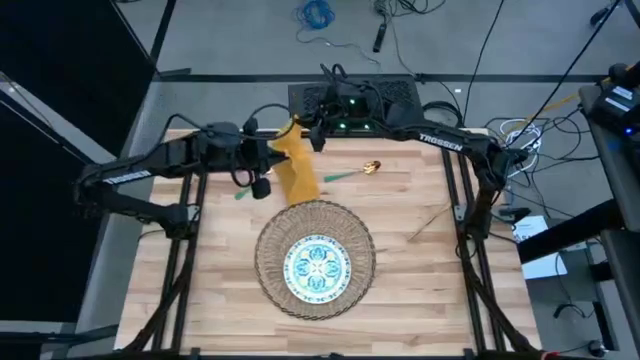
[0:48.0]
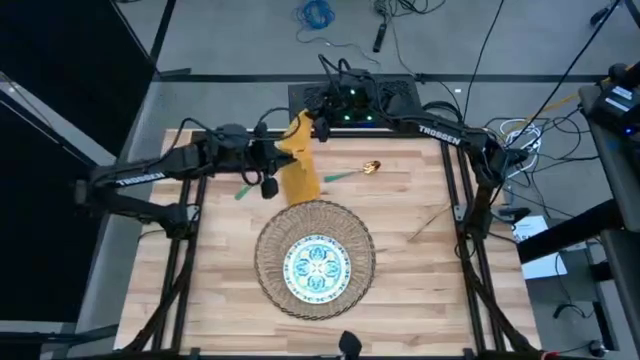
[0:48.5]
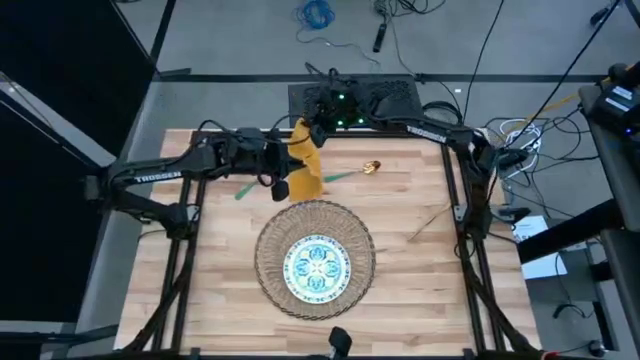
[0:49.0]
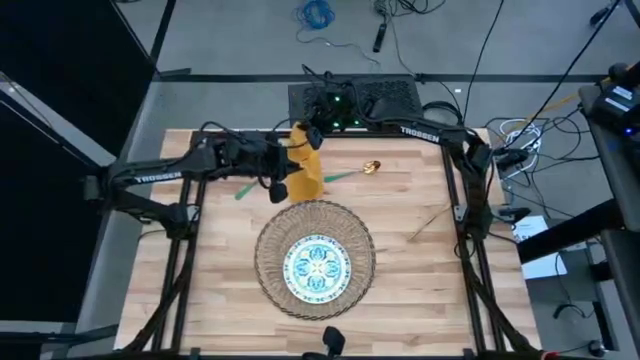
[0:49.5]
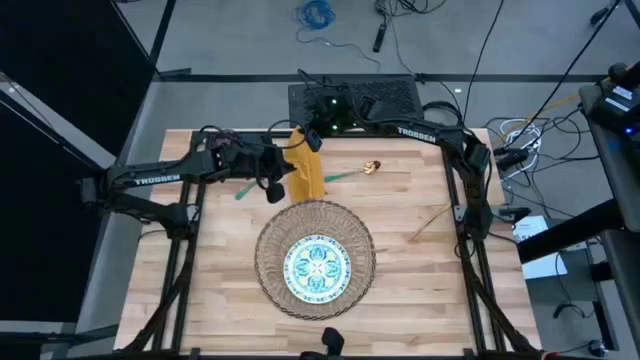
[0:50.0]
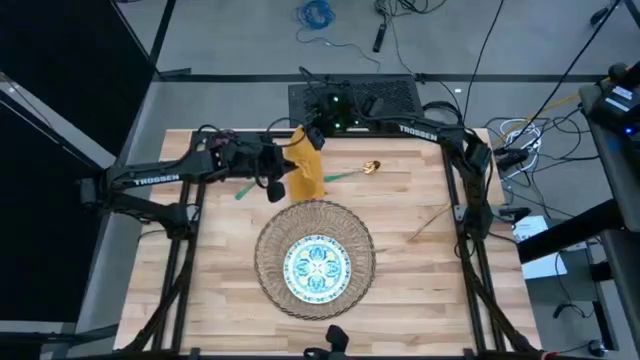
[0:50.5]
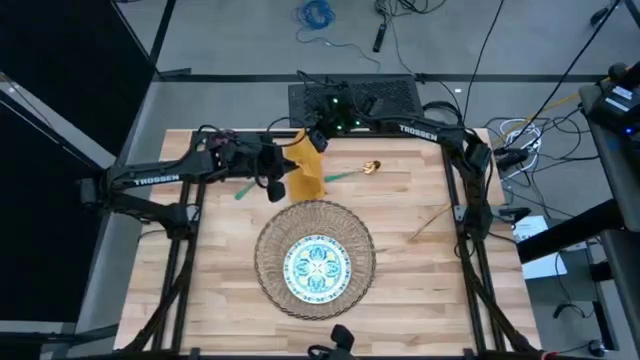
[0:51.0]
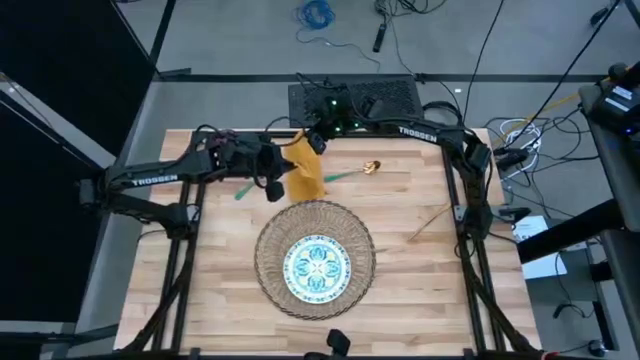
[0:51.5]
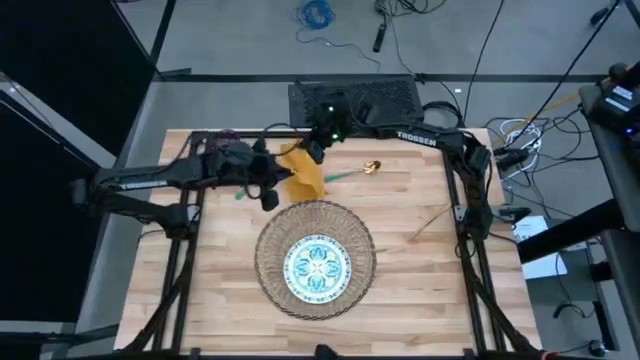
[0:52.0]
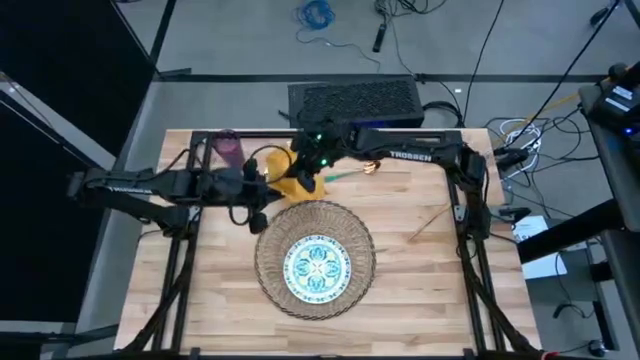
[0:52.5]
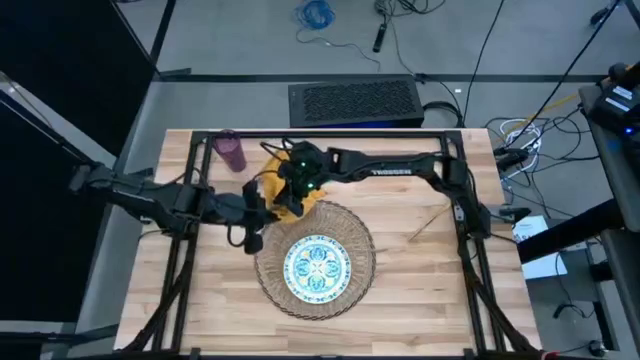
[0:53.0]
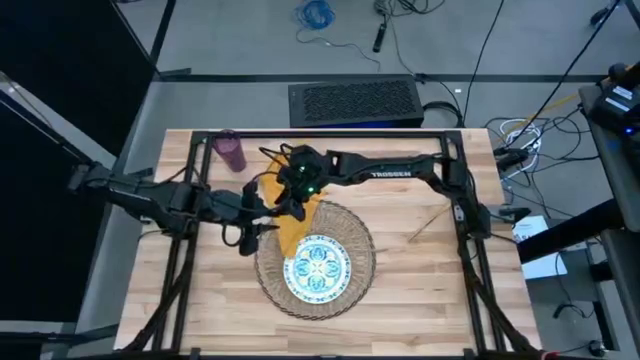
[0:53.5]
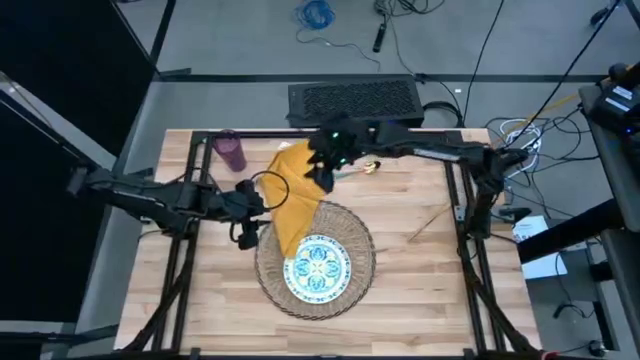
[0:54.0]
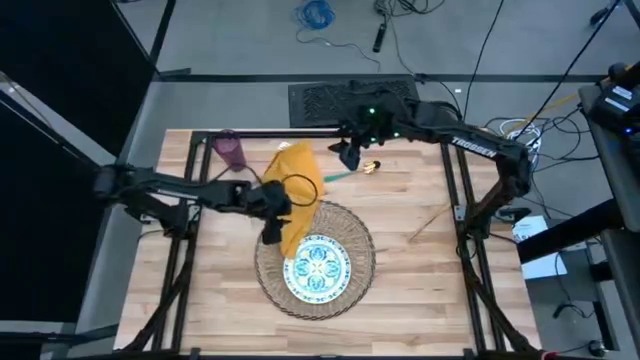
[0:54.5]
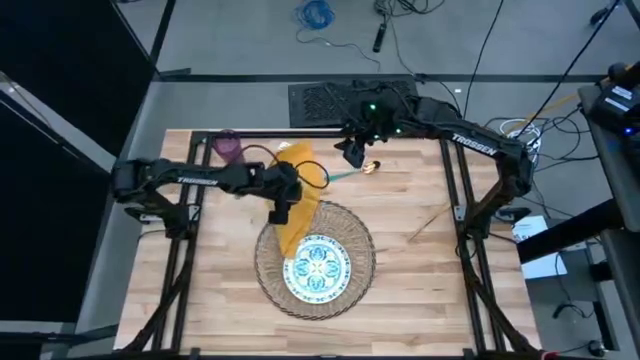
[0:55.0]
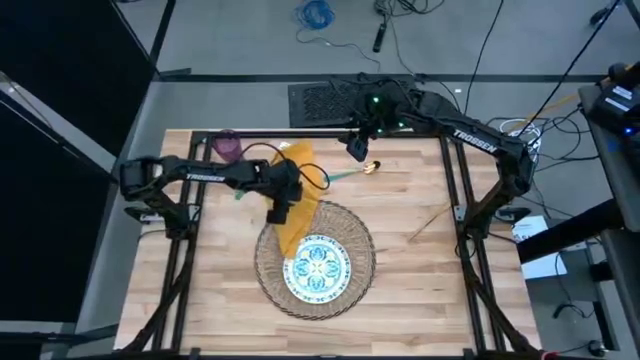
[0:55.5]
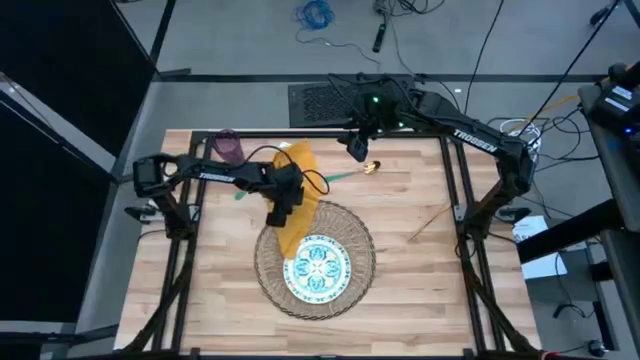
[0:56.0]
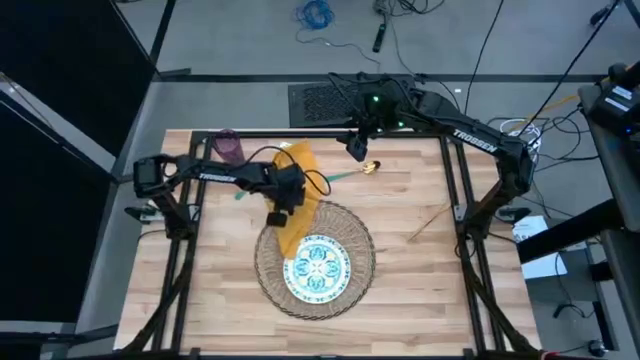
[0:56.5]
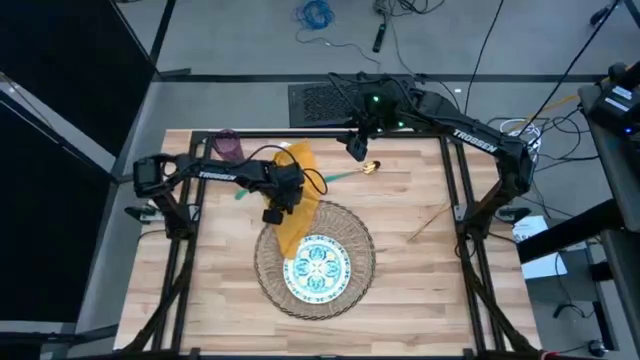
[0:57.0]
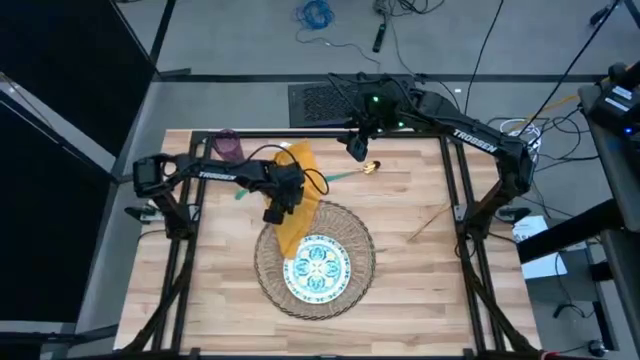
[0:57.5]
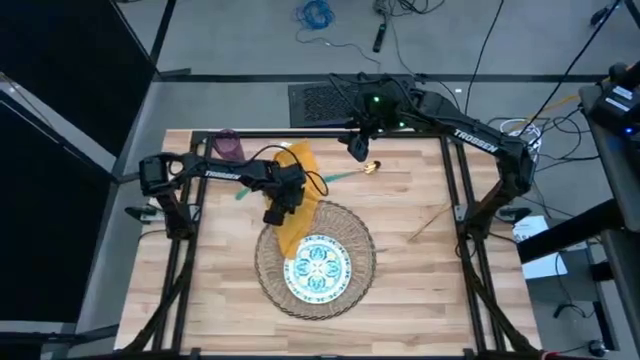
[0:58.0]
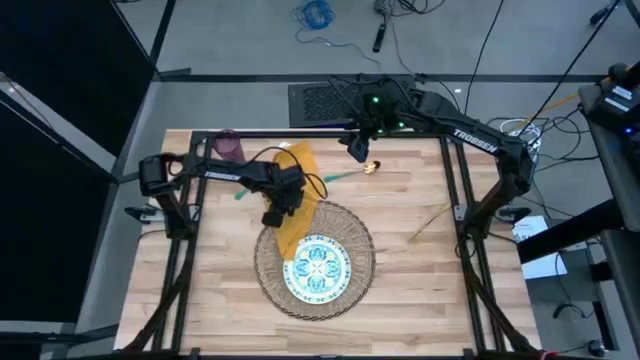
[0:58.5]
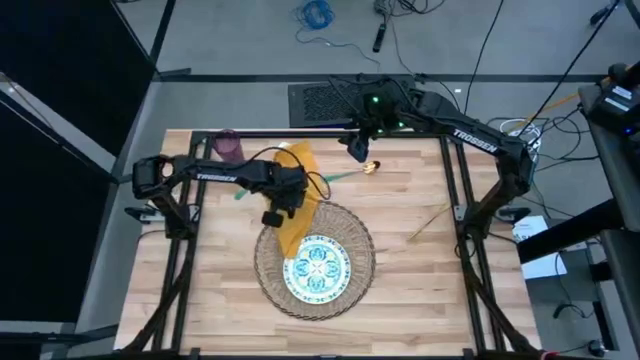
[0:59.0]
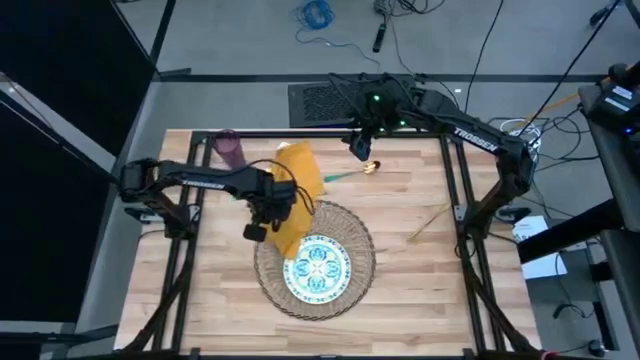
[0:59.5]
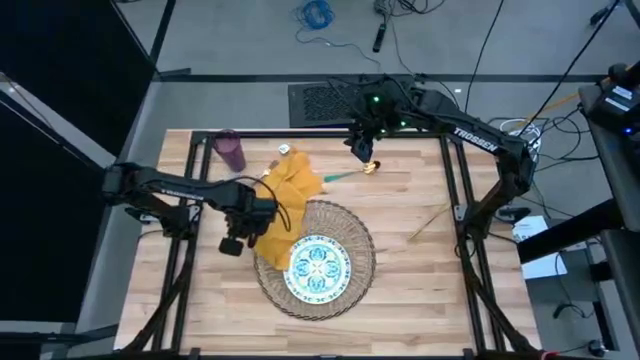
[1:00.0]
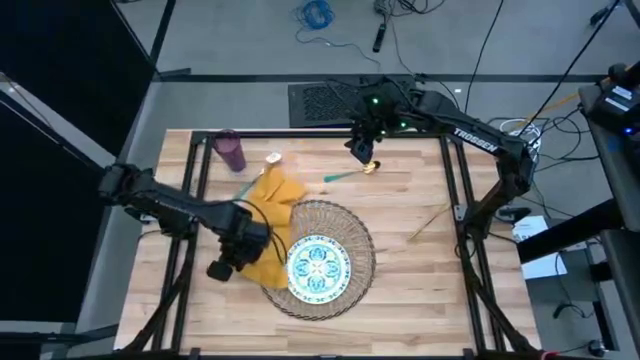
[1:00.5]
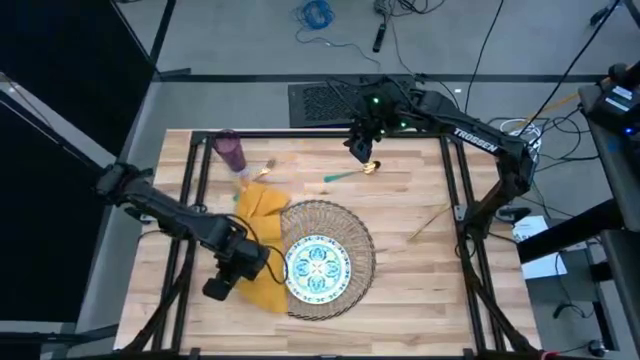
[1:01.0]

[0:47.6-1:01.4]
Task: Set table place
Fold the yellow table napkin

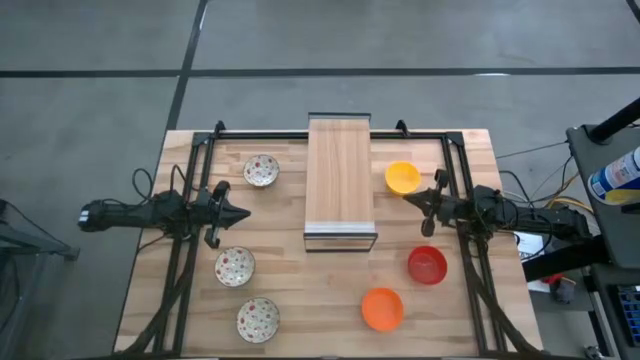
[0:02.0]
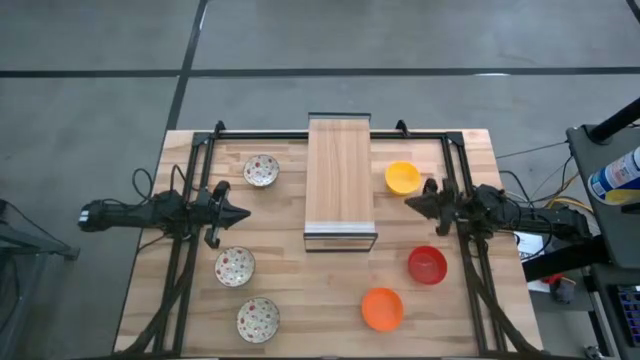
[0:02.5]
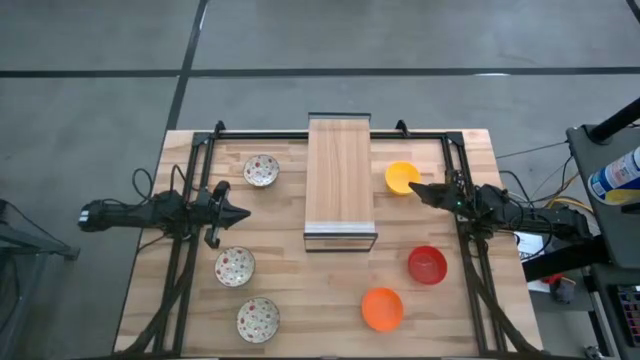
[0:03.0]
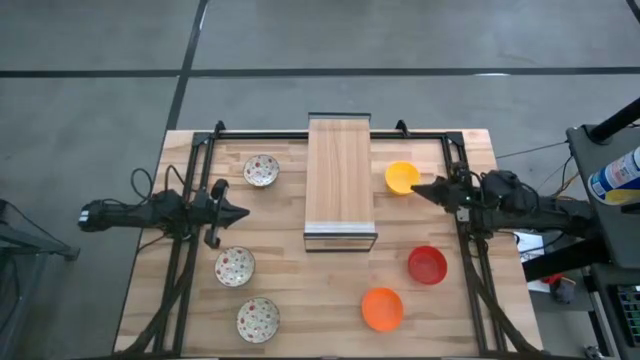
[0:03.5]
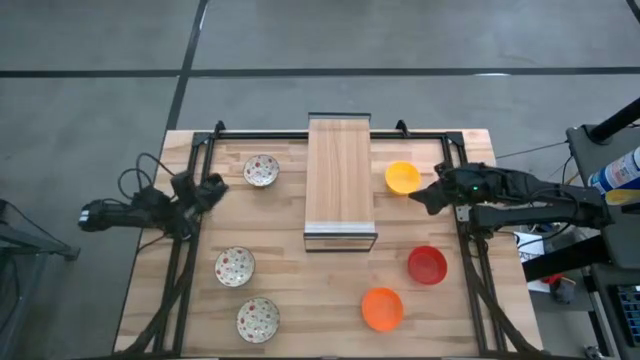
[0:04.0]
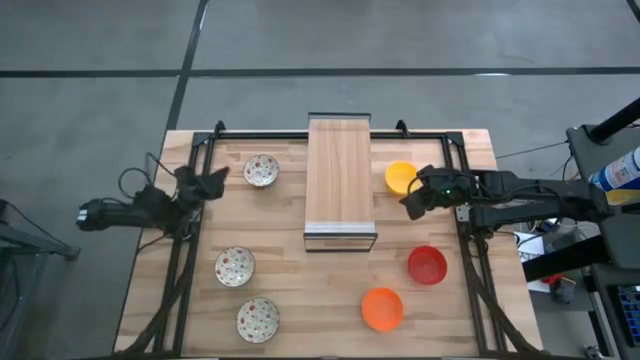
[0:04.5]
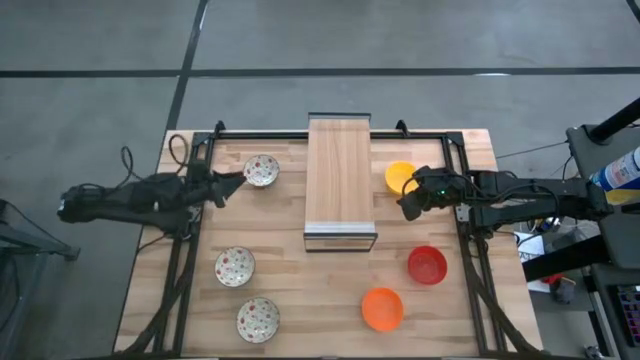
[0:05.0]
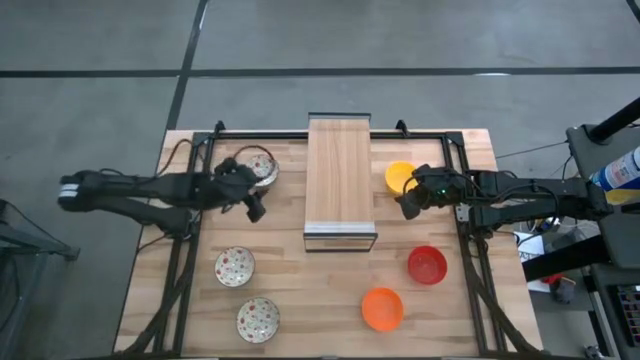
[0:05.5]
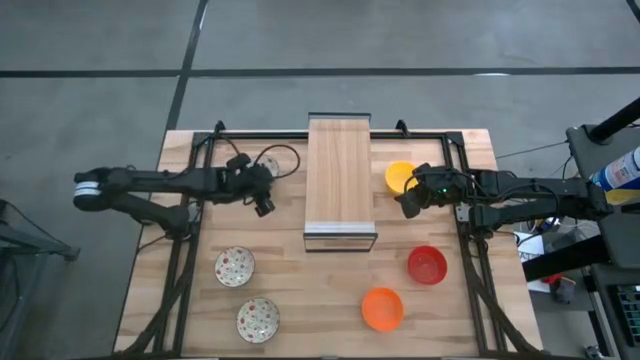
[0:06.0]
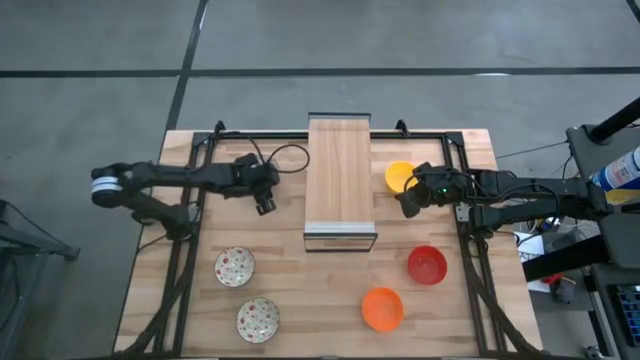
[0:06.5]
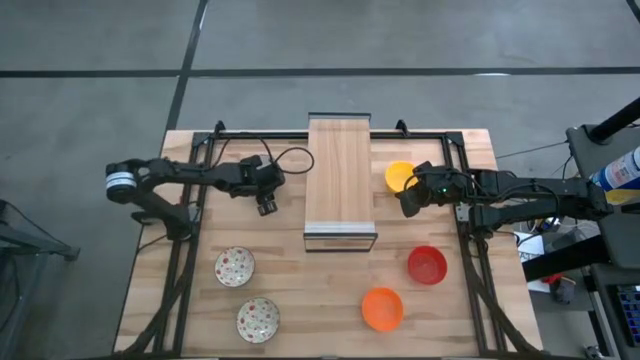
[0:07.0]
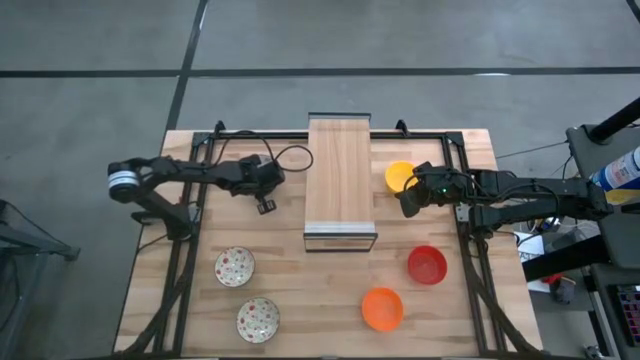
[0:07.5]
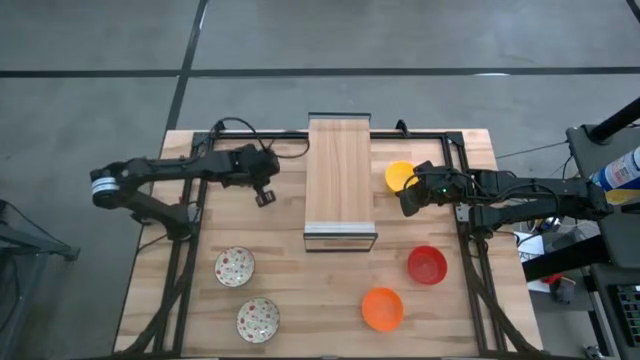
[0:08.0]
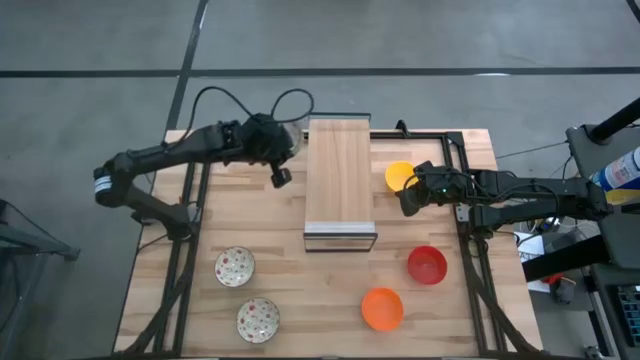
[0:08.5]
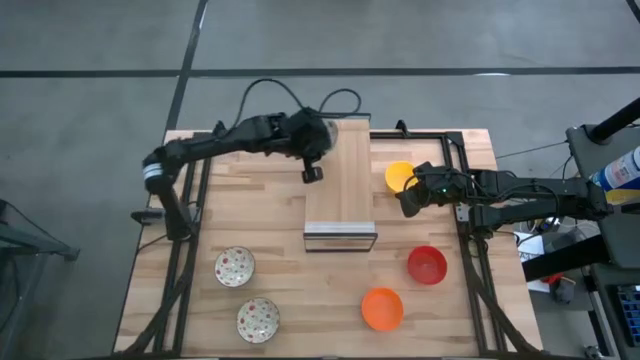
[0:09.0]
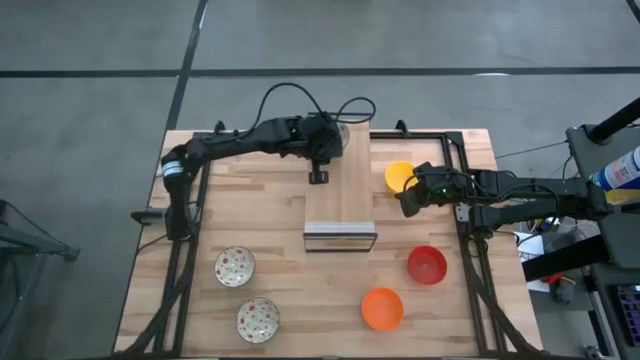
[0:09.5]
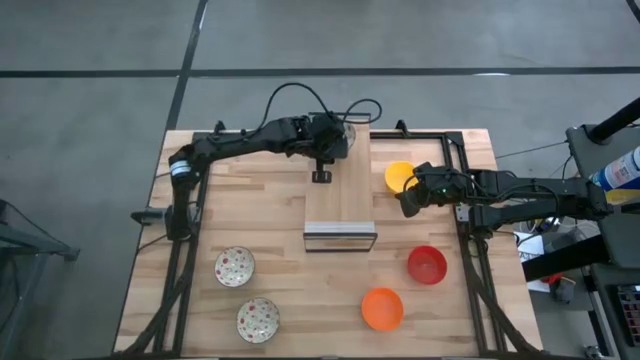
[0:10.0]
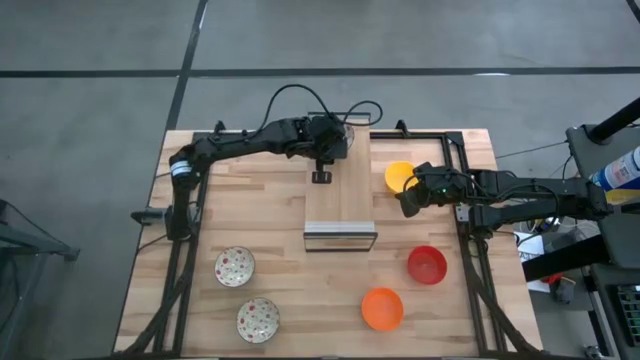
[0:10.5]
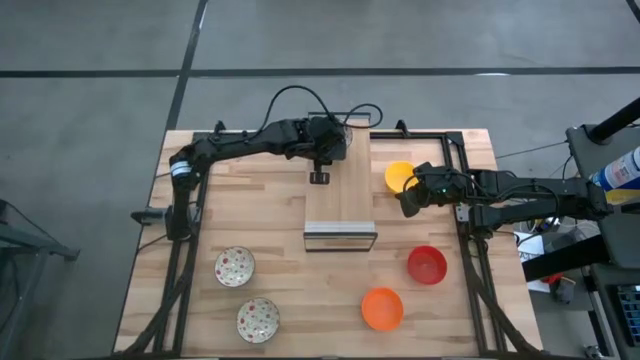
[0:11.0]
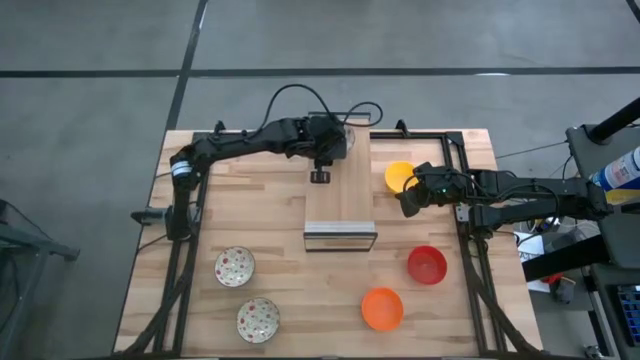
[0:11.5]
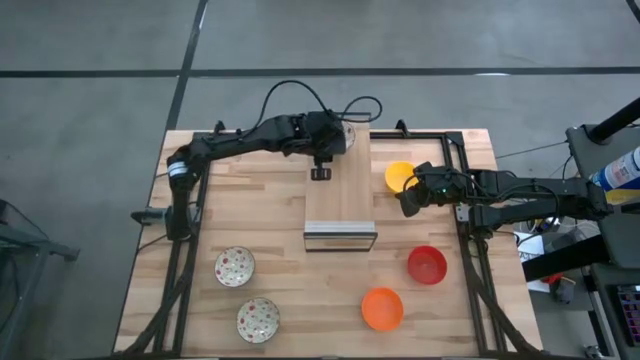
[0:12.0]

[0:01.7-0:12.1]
Task: Pick & Place Mini bowls
Put the top white patterned bowl on the shelf
